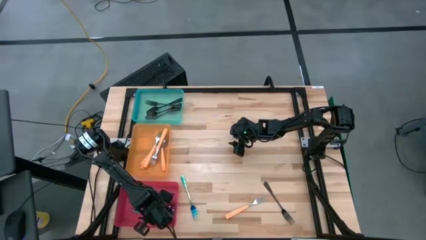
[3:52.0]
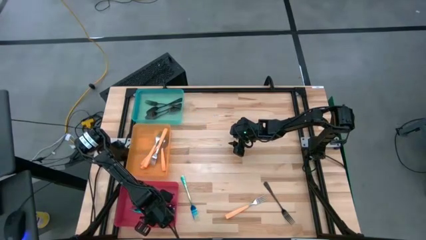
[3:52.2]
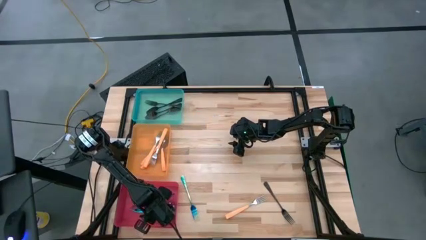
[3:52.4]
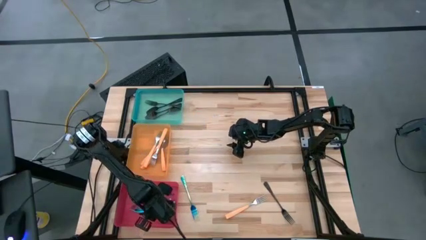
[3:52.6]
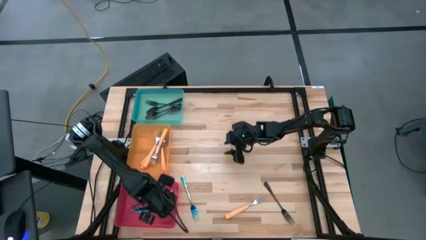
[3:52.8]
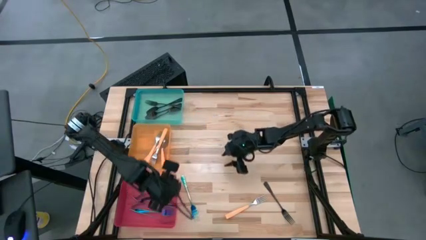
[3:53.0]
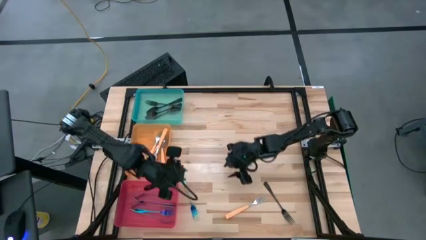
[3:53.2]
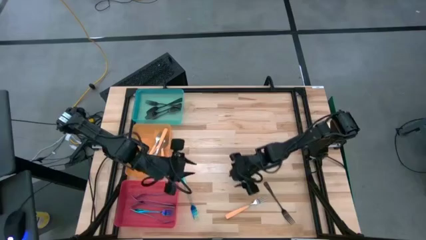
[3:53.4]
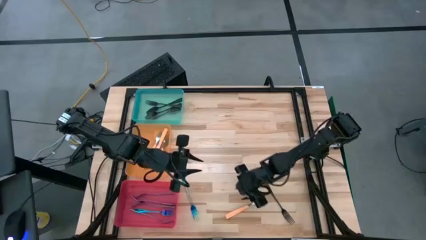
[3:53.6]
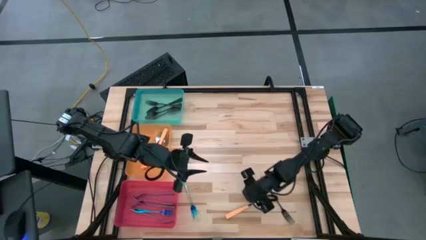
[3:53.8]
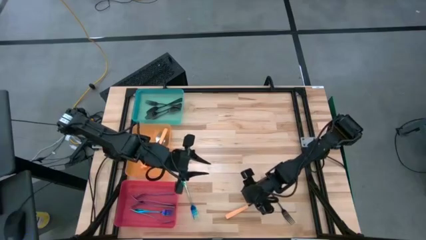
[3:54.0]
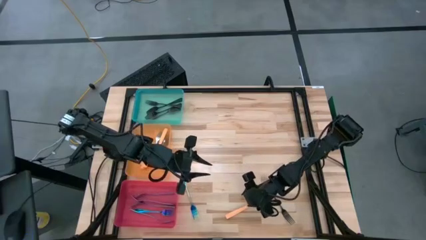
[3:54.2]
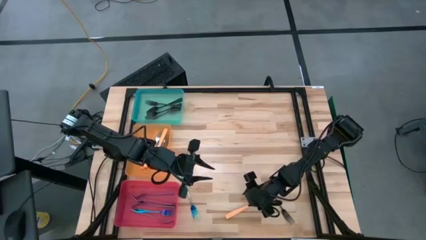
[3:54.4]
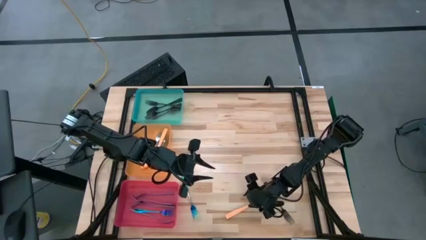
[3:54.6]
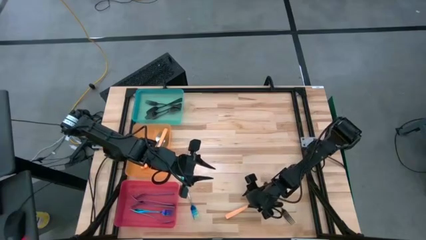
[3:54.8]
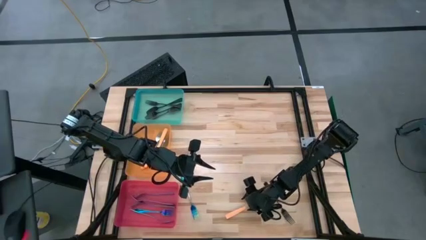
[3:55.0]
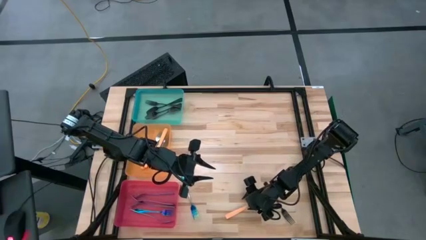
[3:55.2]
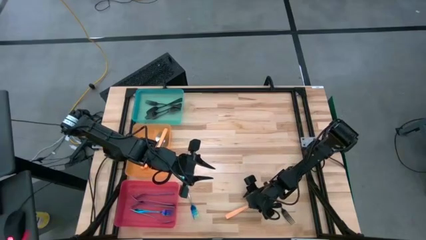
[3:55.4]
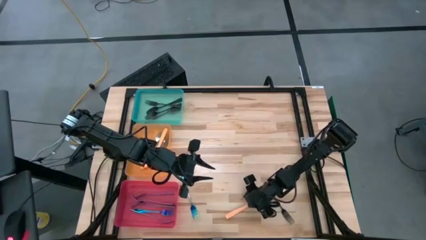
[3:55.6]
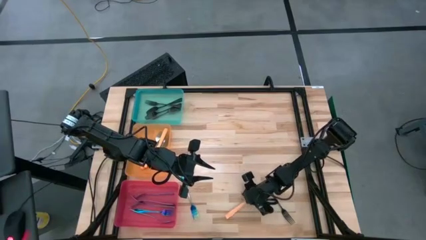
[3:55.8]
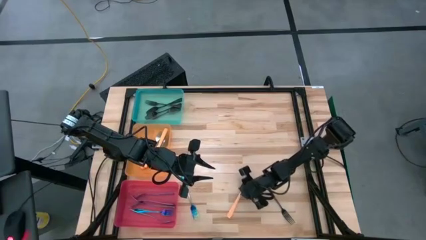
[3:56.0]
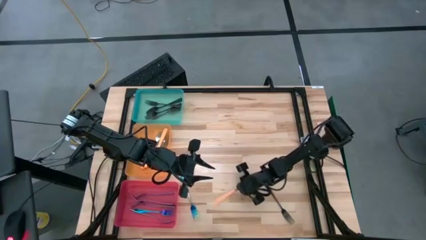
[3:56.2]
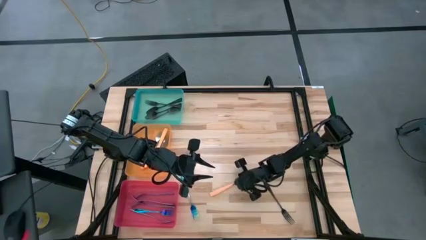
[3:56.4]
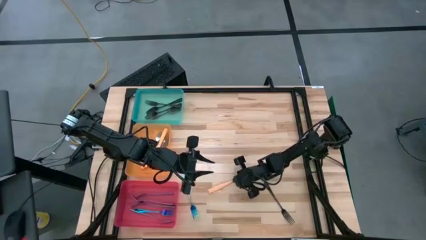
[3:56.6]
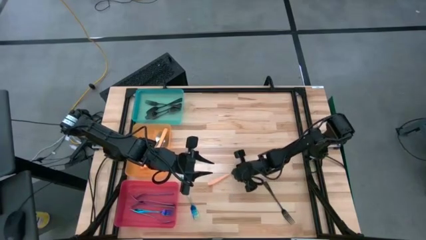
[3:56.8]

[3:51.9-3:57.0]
Task: Sort silverware by color (type)
Put the orange fork into the orange bin

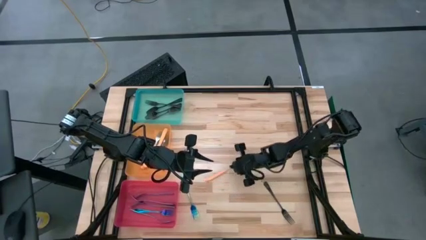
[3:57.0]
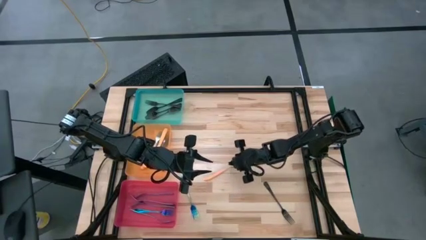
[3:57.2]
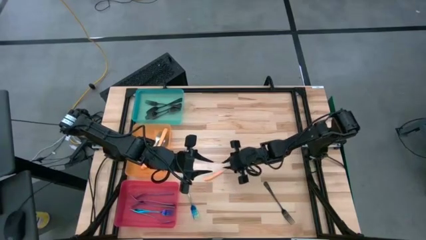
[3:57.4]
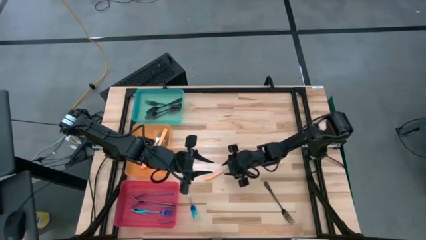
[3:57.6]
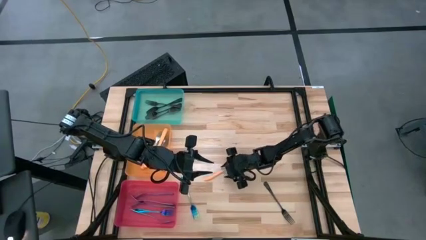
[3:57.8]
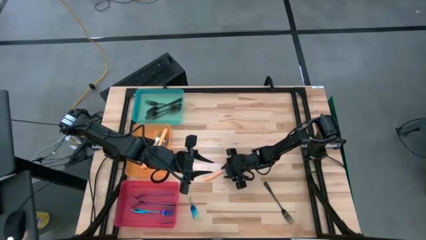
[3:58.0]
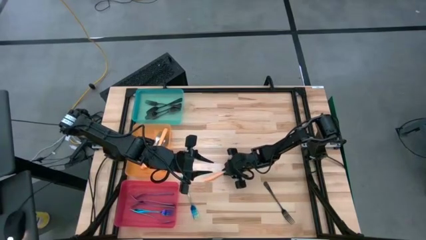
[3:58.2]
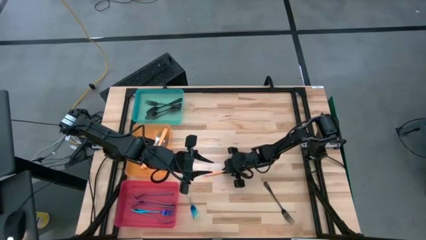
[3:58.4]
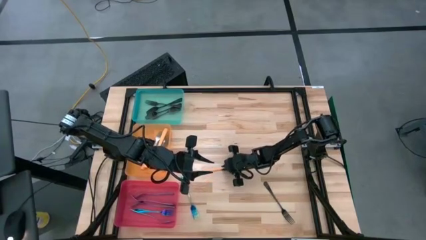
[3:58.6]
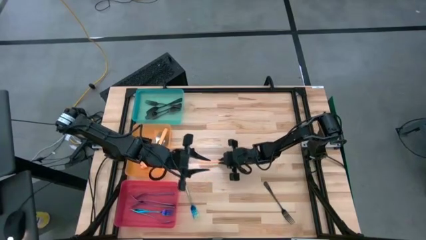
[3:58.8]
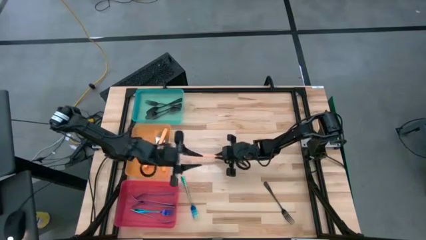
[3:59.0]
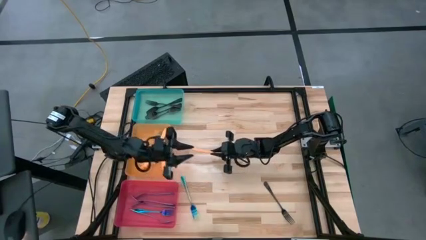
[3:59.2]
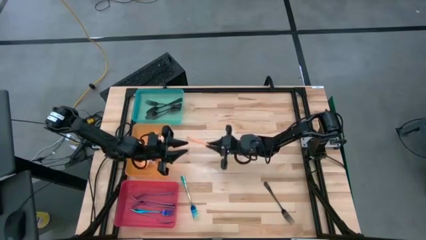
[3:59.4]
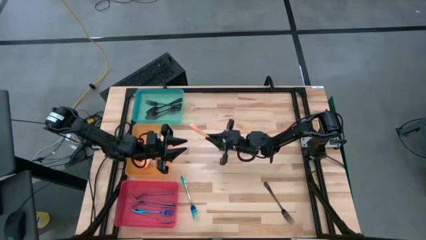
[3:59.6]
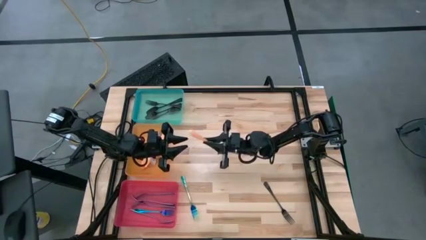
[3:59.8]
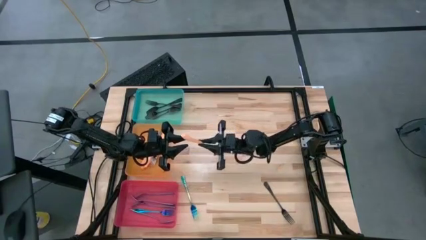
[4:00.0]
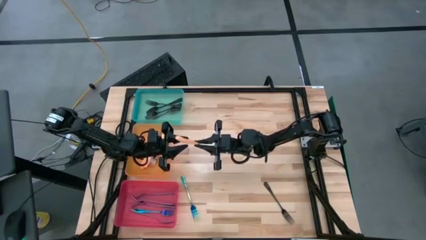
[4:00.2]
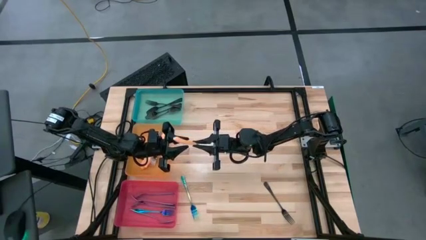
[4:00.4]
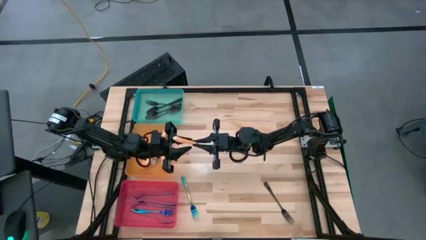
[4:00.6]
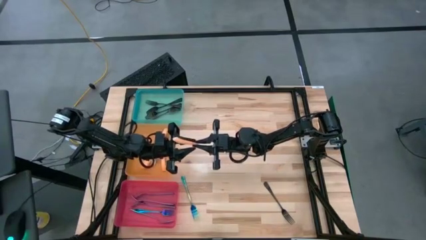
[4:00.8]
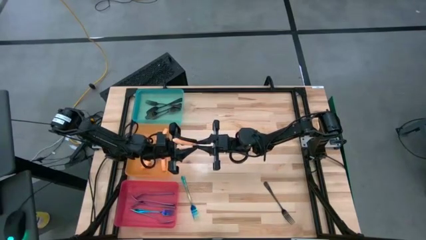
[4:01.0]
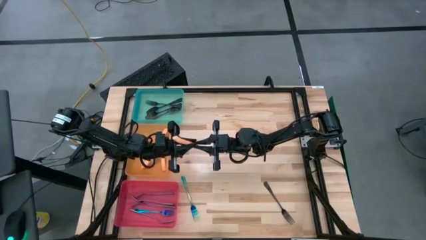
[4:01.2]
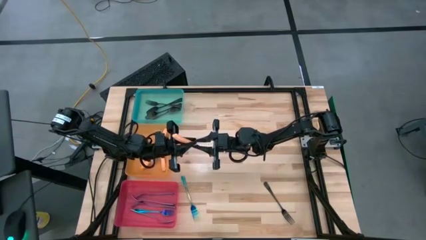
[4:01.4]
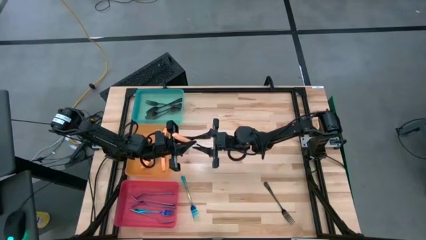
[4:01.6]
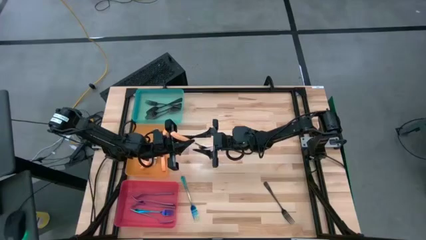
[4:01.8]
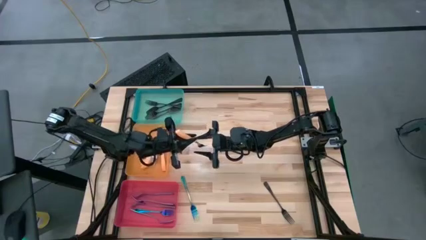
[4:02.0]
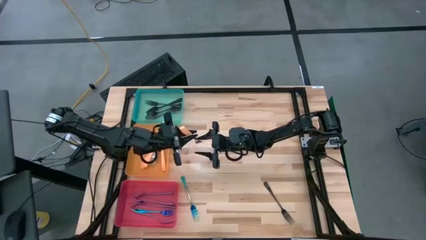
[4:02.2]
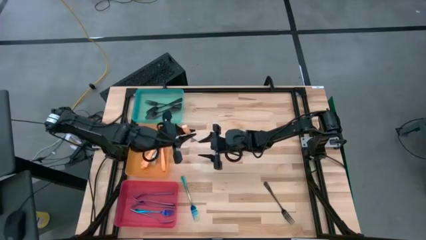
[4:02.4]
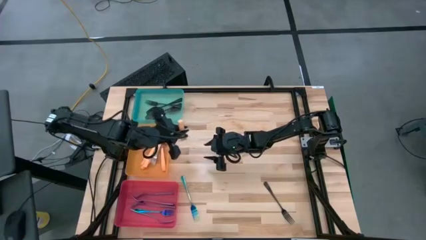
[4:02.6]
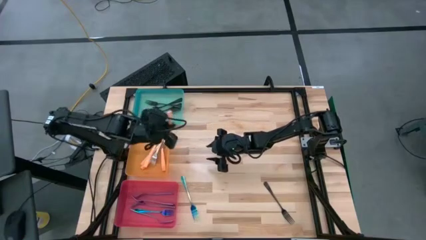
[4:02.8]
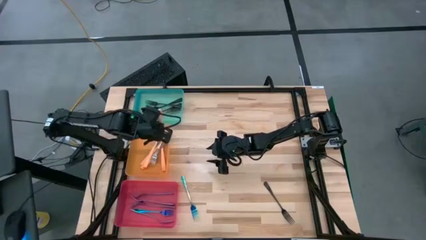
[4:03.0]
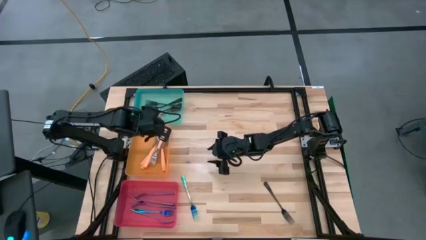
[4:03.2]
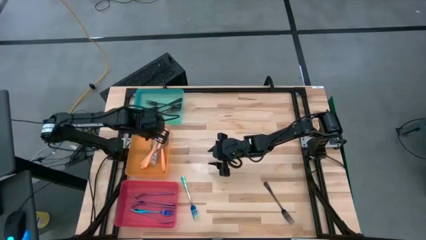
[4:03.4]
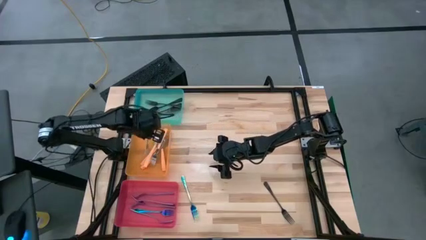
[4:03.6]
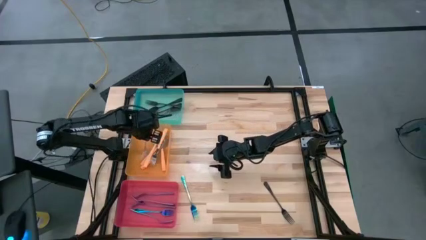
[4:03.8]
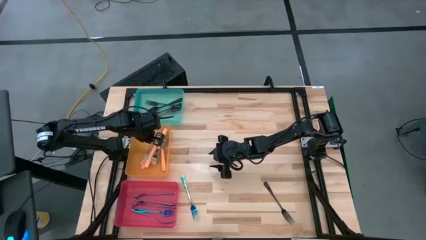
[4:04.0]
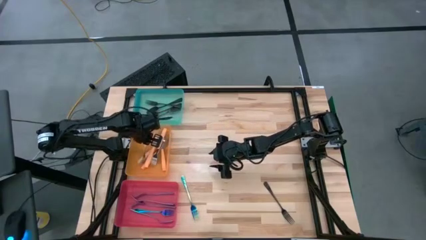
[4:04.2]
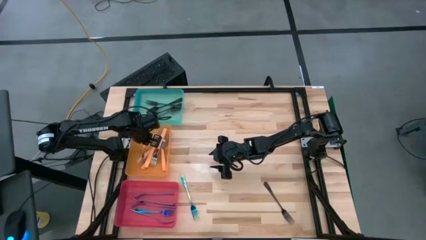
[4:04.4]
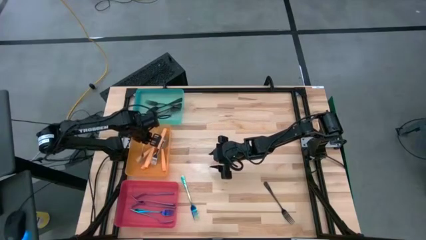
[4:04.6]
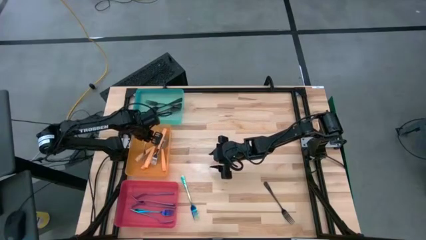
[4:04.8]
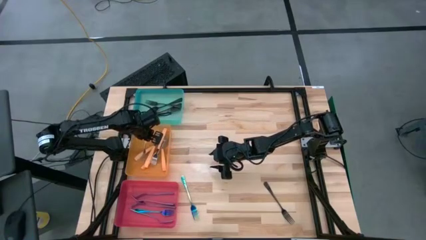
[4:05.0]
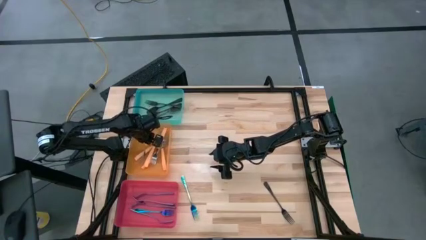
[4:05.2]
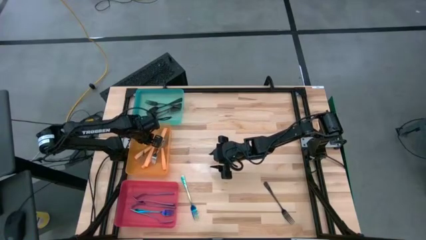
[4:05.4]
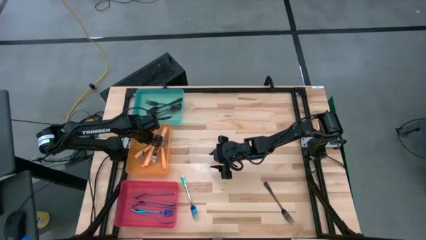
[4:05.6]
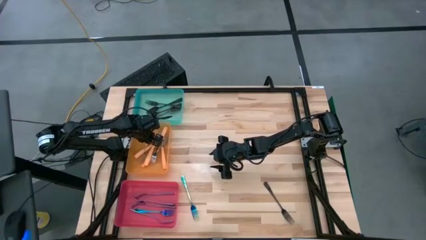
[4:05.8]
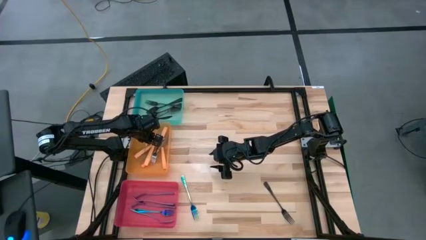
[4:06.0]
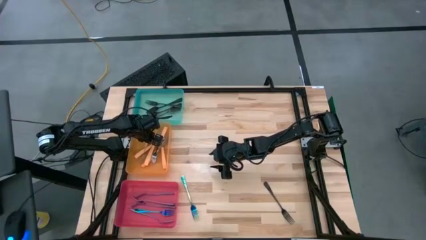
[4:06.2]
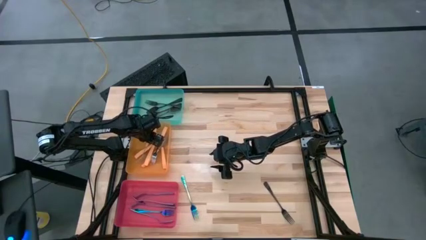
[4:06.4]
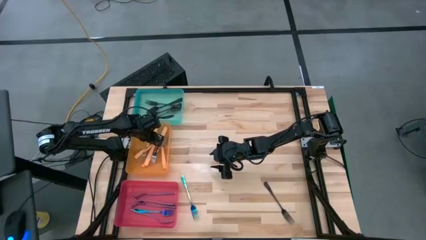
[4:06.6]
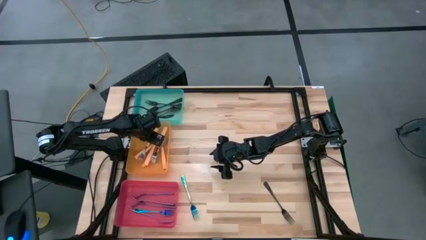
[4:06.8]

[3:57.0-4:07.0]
Put the orange fork into the orange bin
